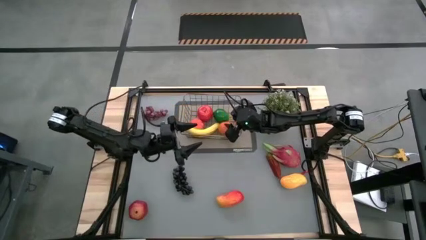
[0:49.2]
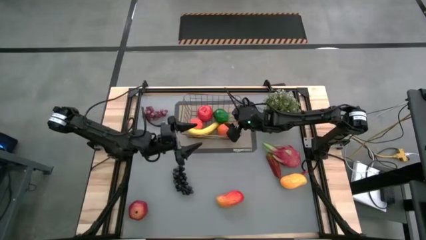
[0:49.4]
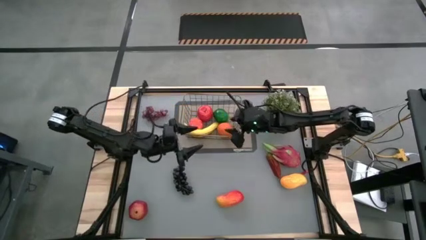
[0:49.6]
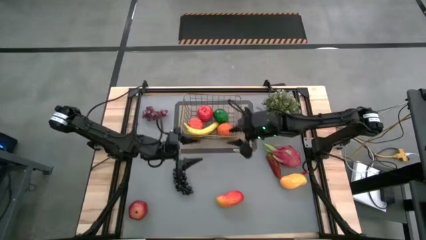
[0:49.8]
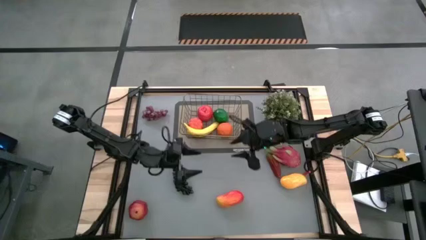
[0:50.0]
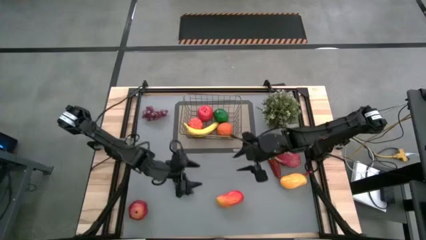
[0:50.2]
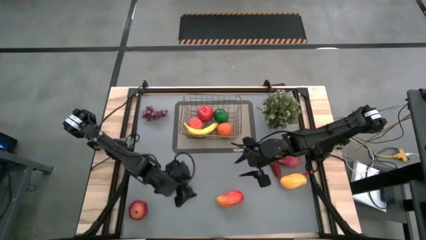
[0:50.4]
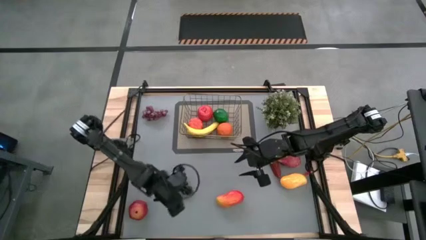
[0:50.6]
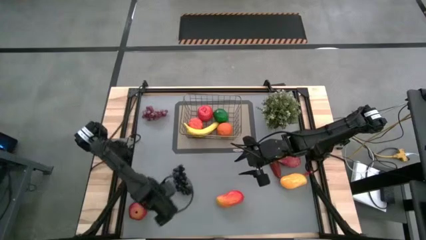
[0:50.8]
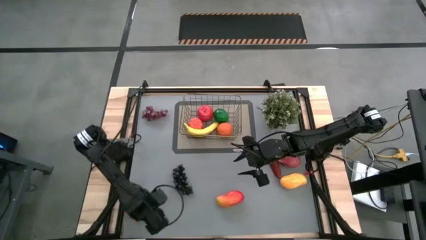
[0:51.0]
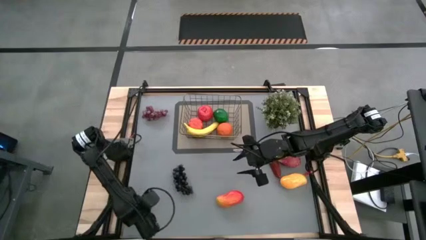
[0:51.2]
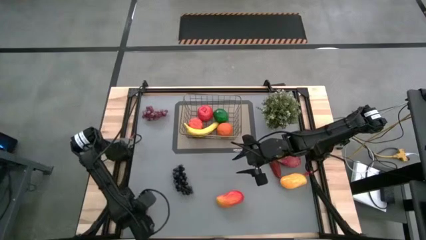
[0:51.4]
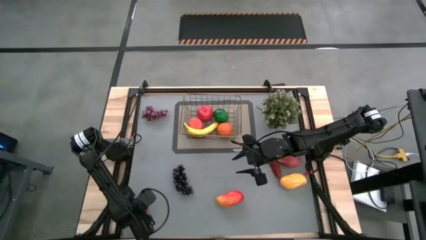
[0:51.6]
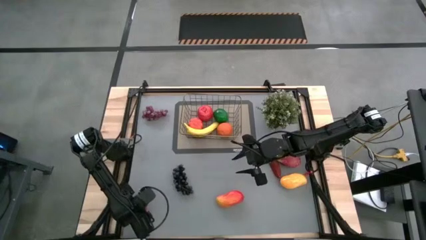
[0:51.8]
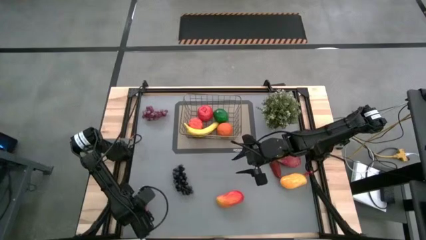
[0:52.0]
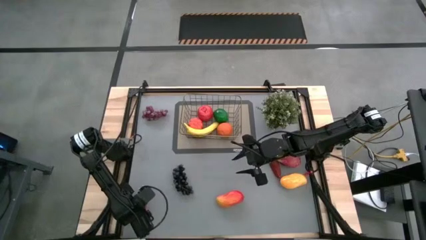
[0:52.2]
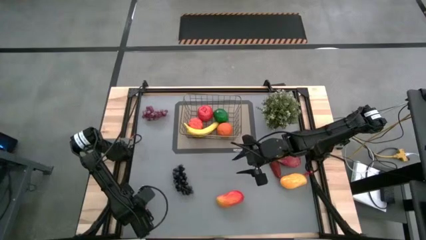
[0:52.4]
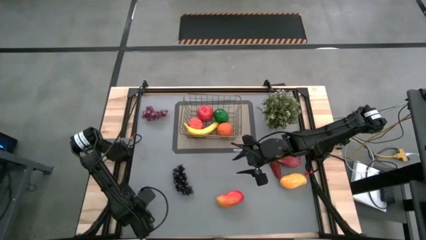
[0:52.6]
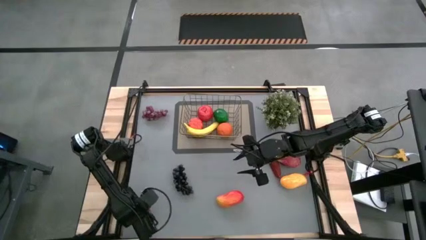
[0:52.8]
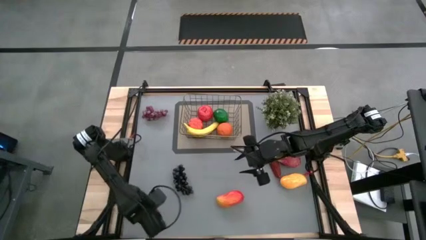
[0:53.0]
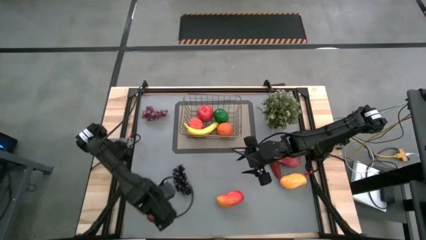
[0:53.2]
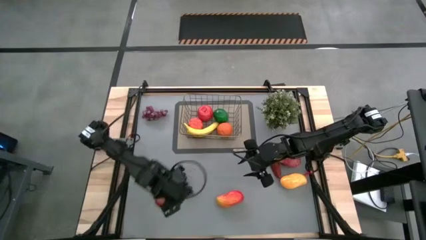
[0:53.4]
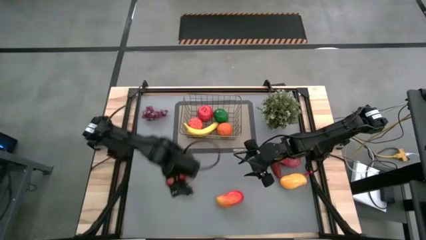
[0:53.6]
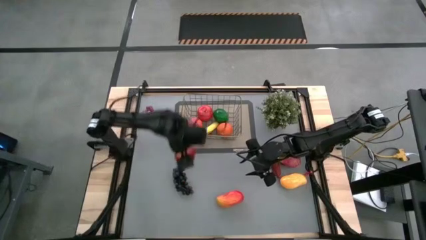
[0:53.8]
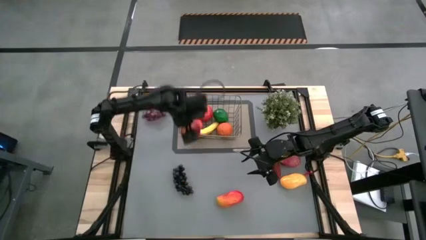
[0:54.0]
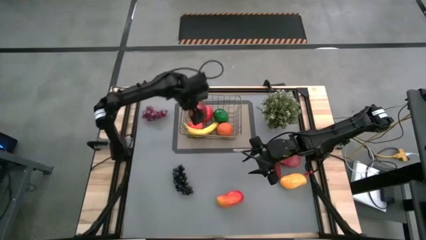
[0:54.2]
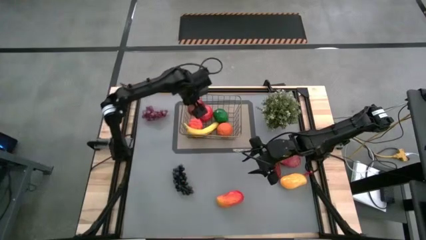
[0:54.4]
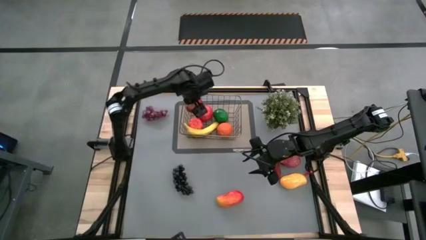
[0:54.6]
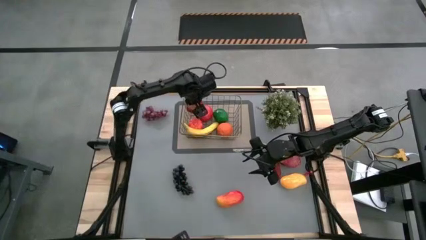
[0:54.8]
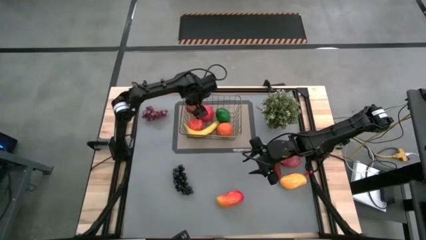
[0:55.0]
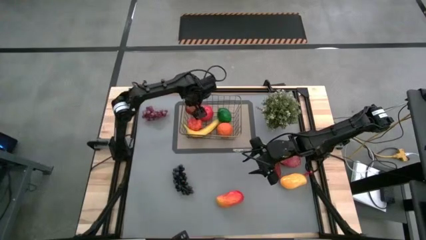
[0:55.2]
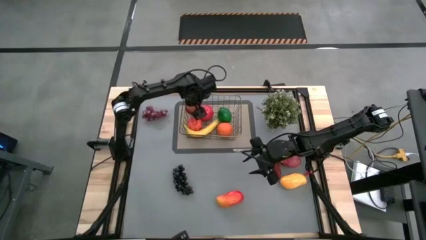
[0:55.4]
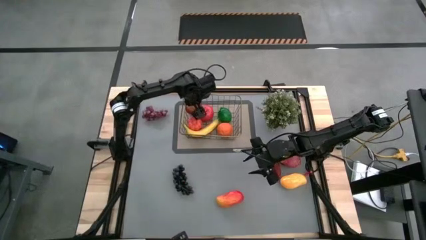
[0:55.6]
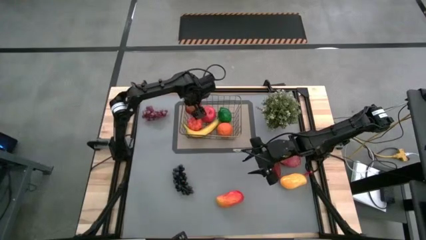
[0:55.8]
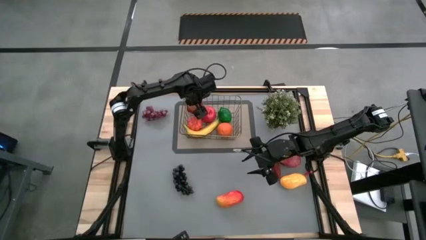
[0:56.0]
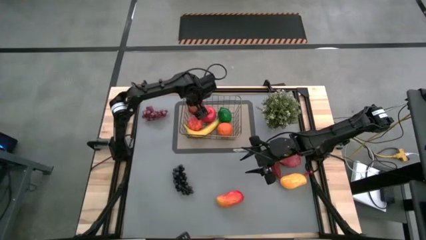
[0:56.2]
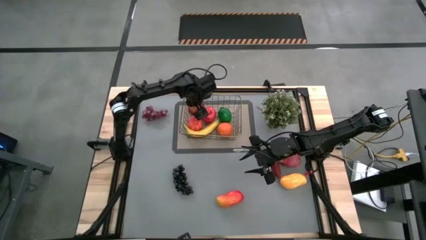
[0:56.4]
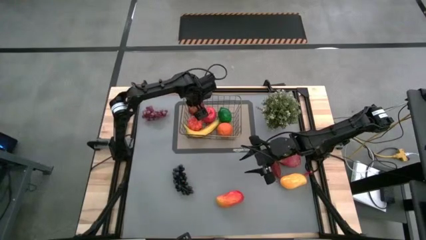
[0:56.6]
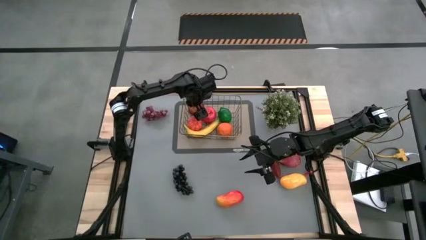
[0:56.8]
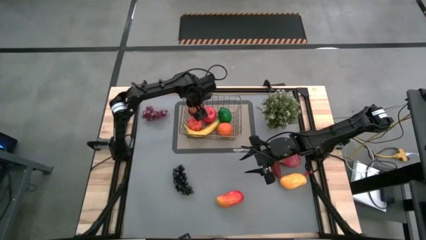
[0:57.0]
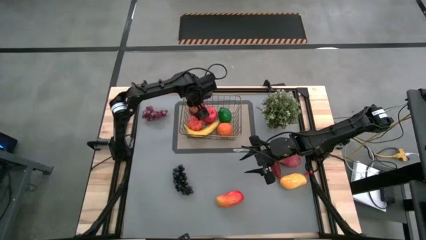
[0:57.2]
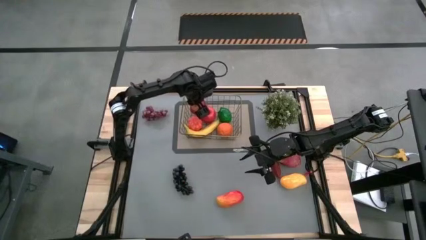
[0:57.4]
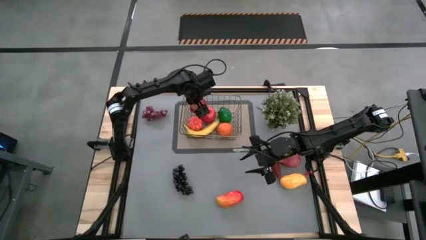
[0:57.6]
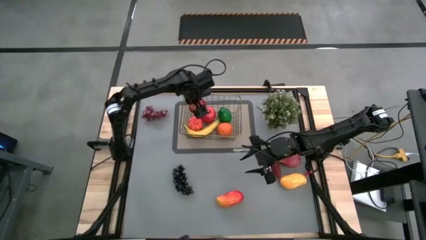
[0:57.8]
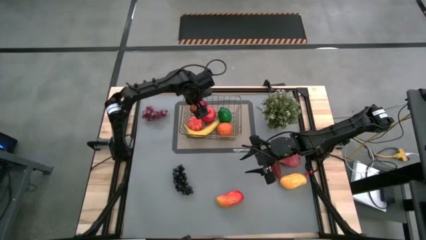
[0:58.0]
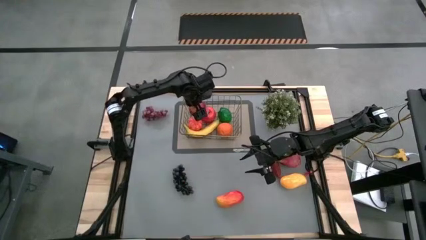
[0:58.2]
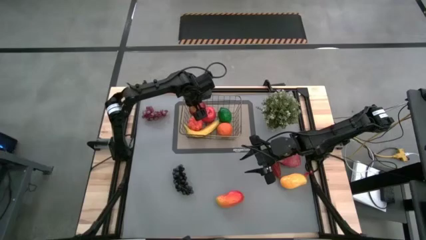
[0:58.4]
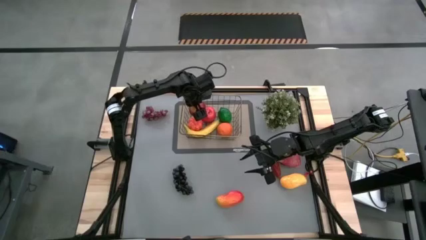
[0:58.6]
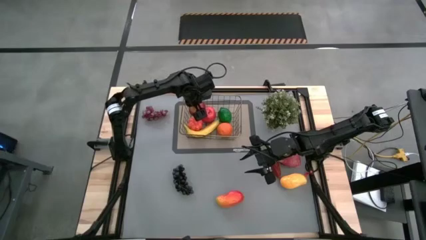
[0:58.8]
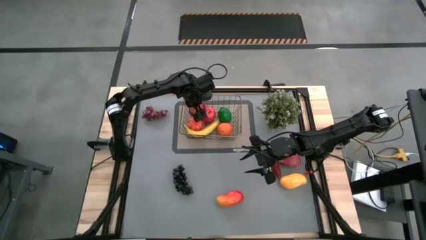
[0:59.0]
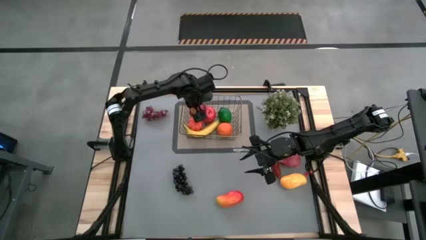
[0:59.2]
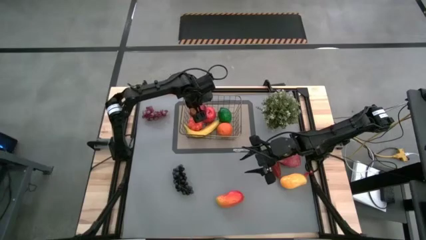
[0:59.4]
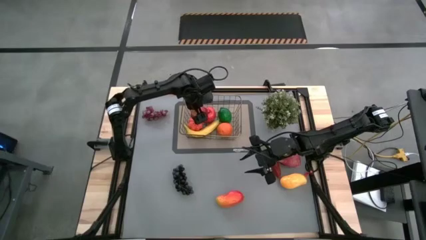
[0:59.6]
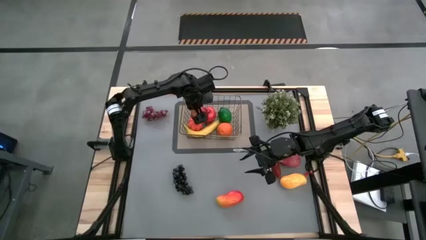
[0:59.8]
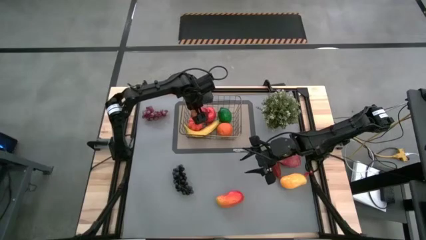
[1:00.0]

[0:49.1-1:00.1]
Task: Build produce basket
Put the pomegranate into the wire basket

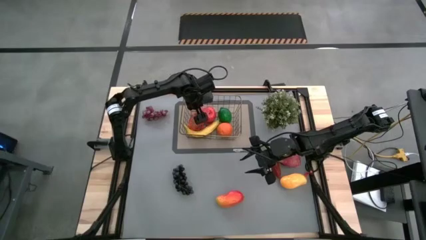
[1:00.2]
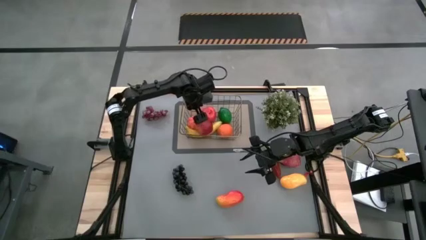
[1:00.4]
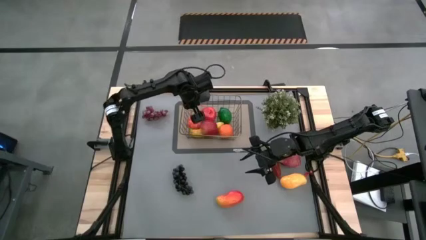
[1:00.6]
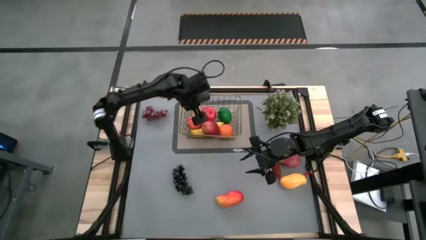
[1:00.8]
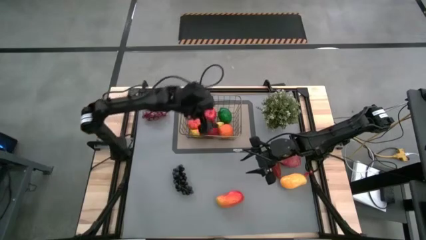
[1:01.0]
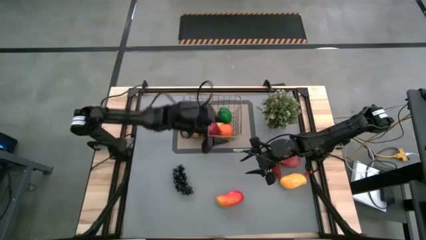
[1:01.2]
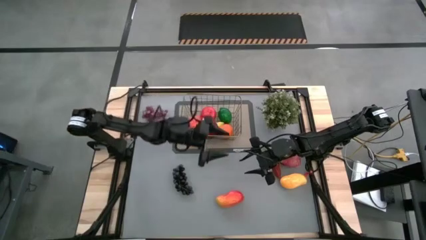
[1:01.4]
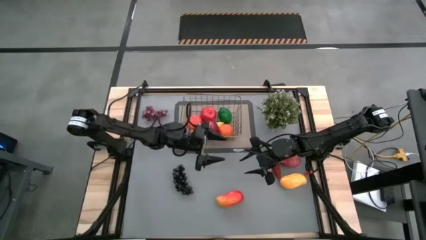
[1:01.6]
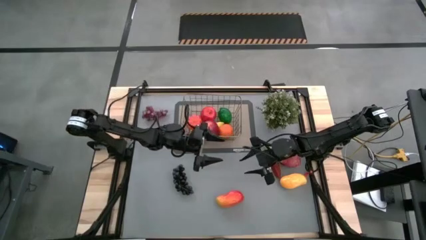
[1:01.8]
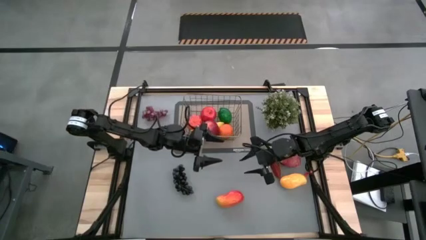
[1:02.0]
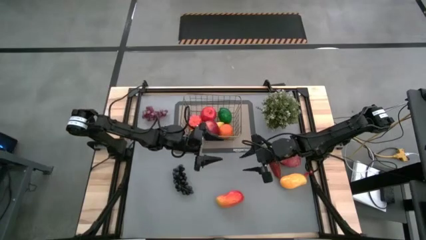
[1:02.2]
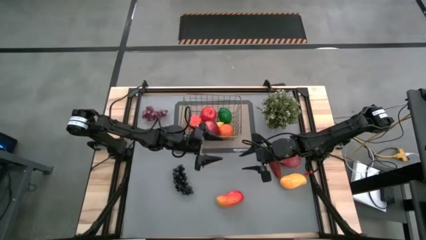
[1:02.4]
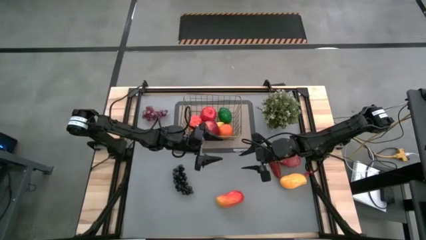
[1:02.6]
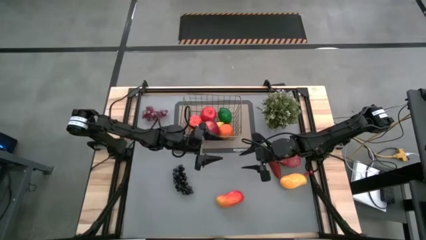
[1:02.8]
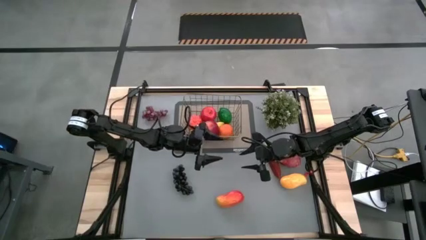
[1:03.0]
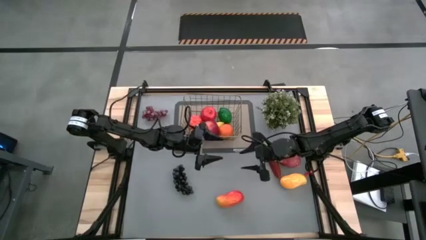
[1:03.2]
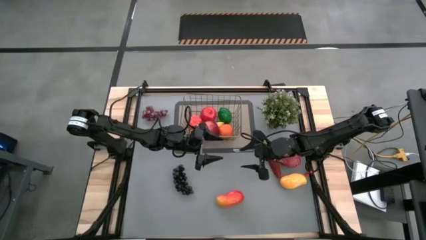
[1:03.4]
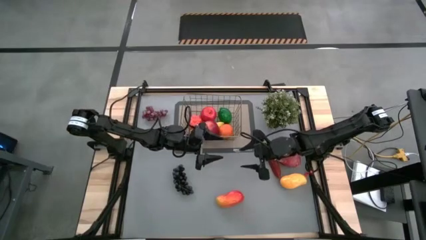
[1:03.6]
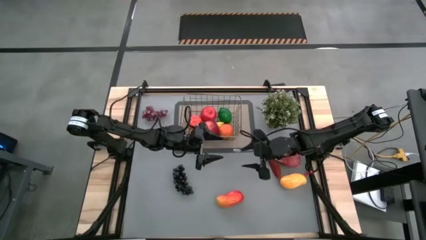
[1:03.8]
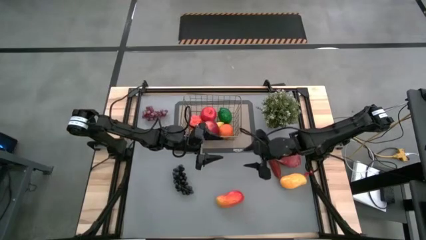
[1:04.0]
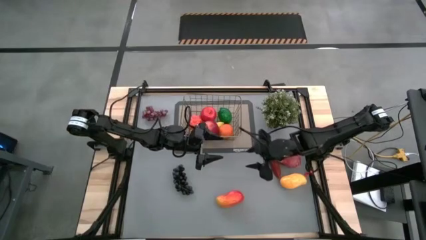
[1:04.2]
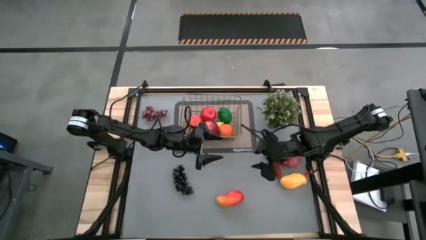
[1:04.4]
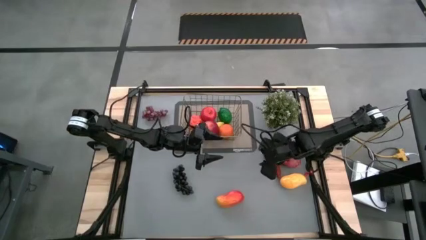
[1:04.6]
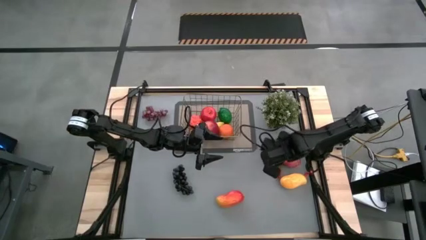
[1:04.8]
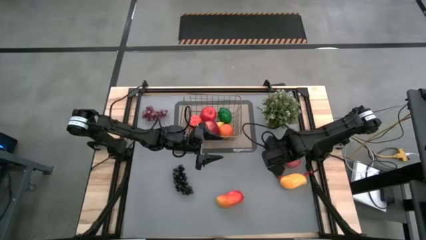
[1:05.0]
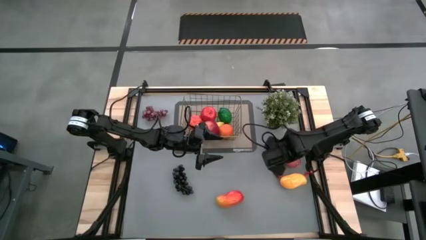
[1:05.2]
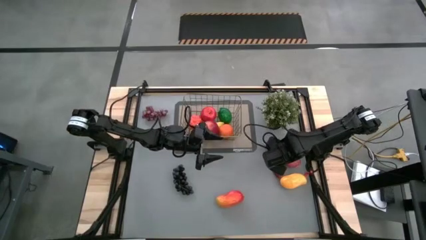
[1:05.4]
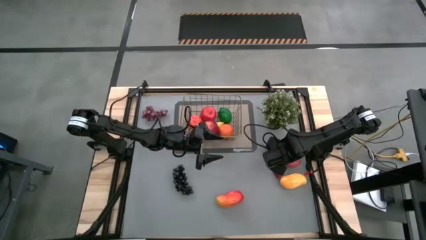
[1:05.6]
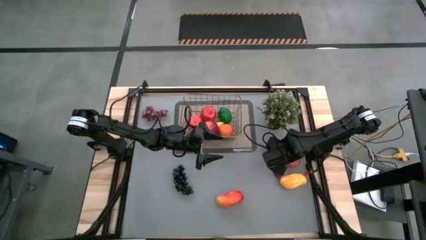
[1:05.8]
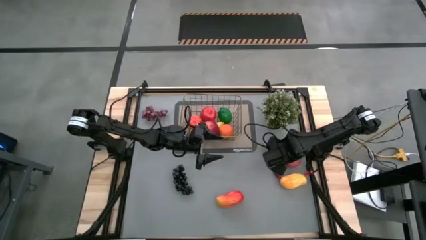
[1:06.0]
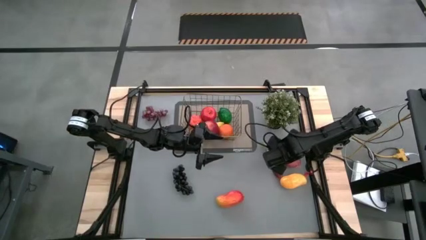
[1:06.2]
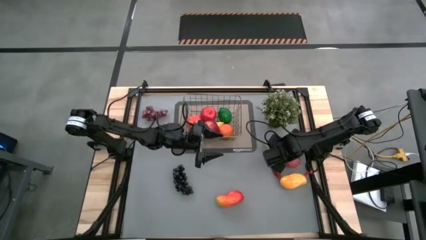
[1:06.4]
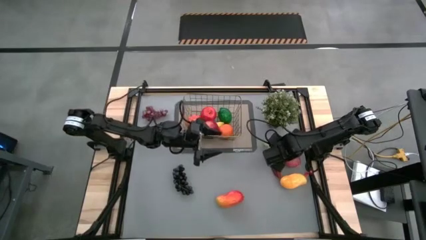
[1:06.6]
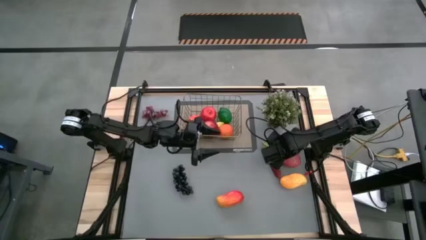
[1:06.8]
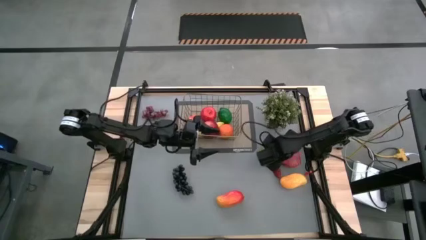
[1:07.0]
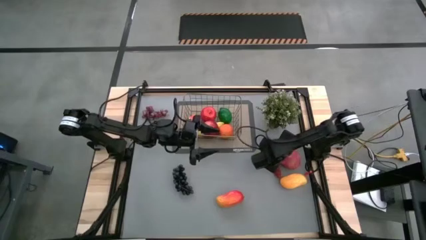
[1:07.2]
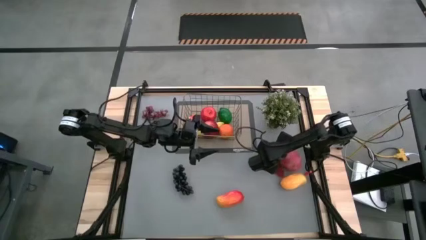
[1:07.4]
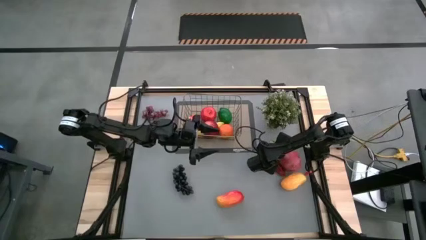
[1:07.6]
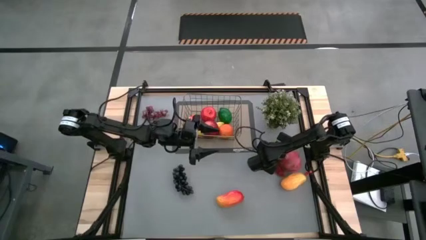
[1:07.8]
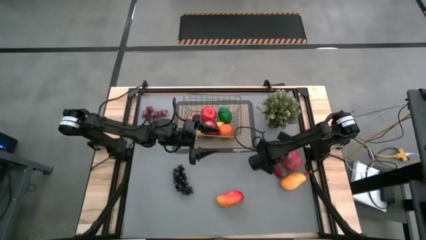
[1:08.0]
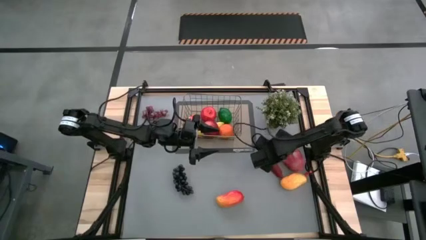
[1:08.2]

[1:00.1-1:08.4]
Put the dragonfruit into the wire basket
